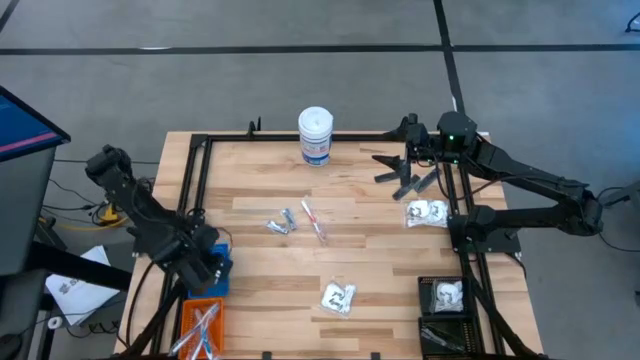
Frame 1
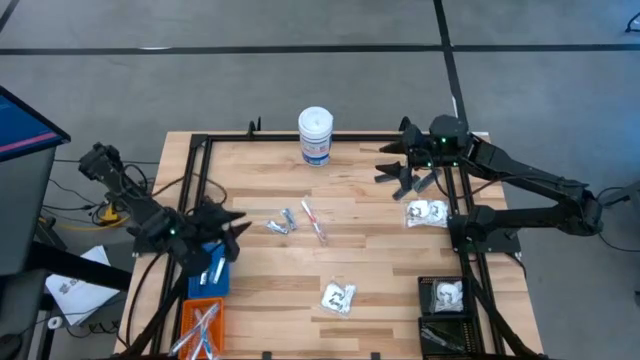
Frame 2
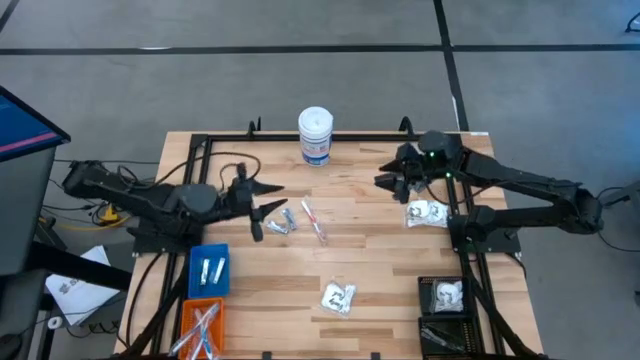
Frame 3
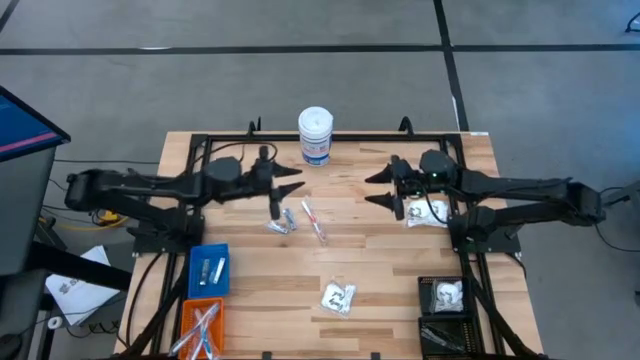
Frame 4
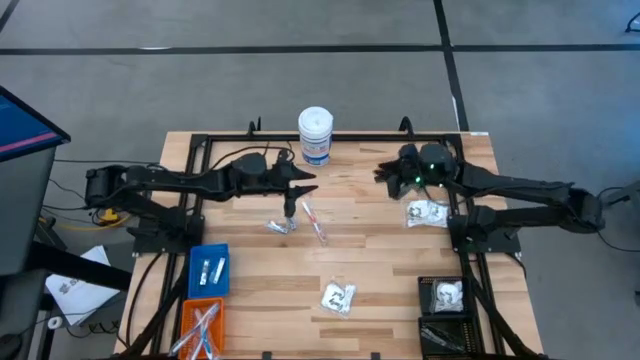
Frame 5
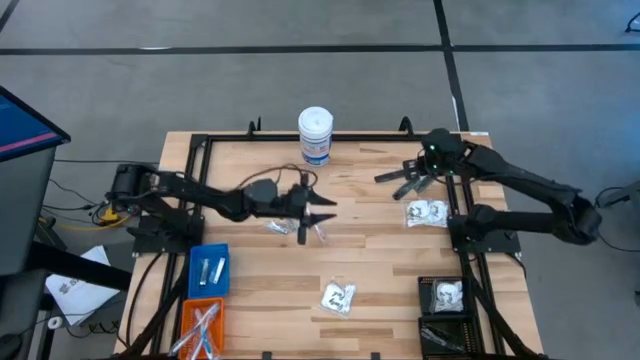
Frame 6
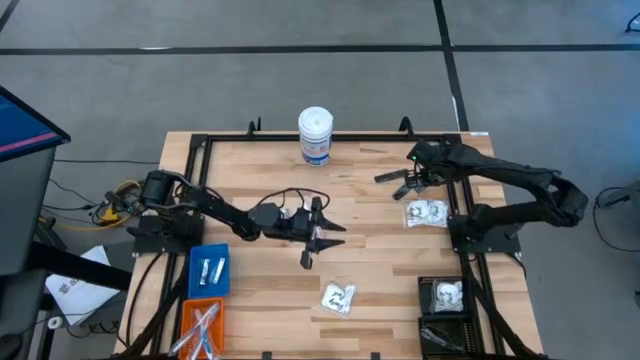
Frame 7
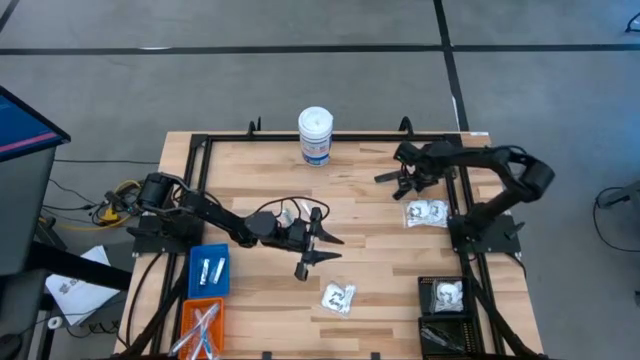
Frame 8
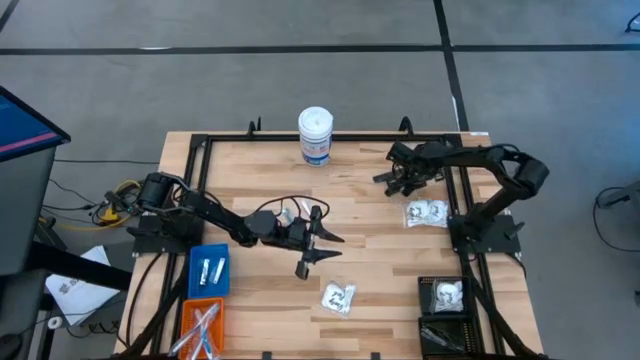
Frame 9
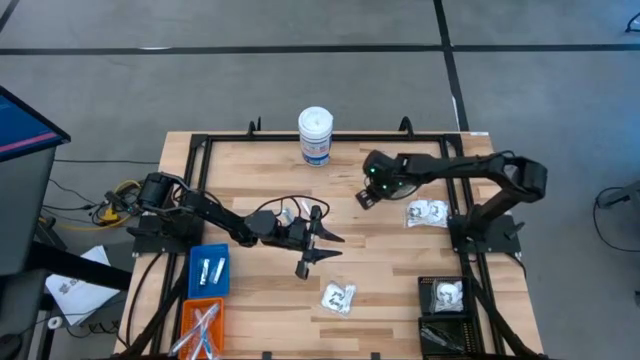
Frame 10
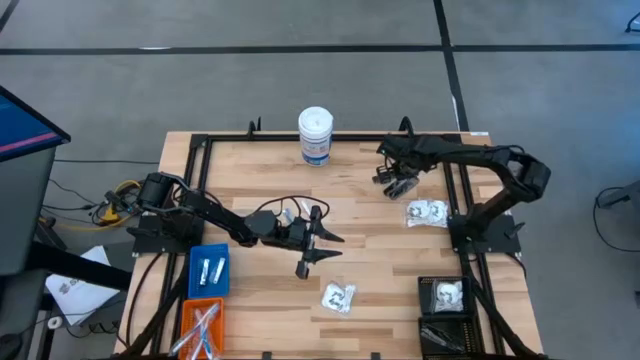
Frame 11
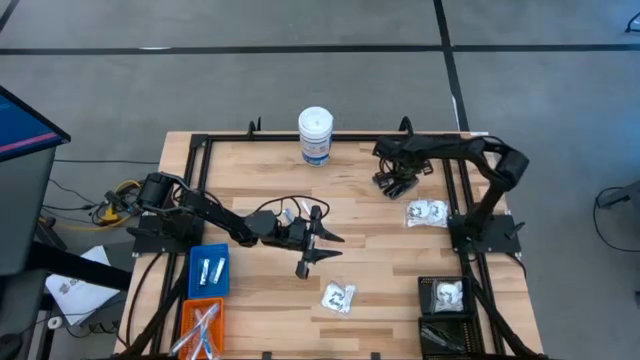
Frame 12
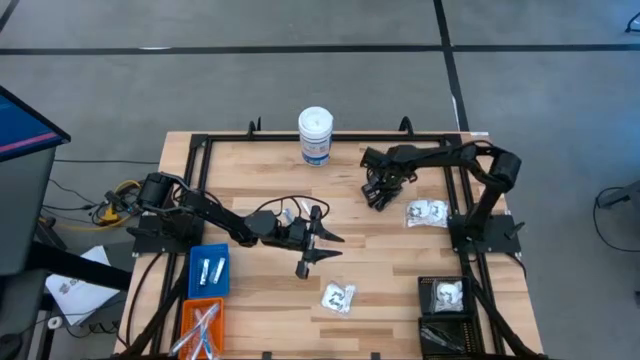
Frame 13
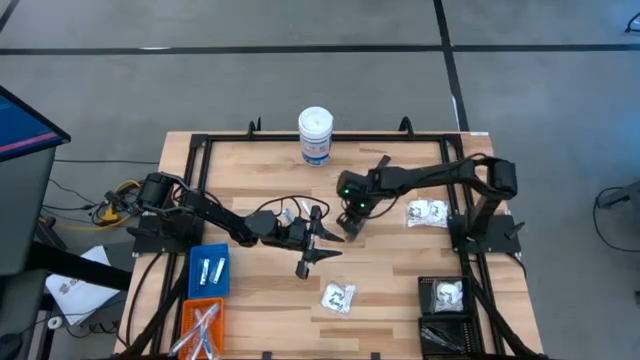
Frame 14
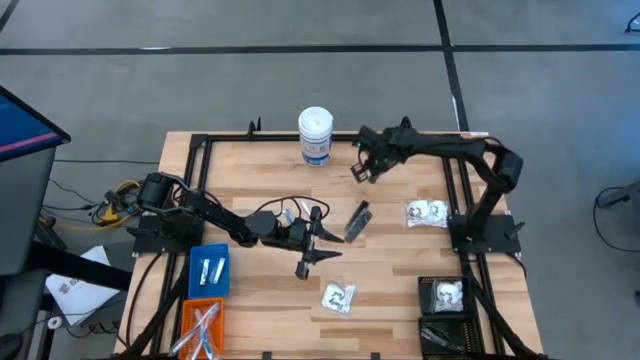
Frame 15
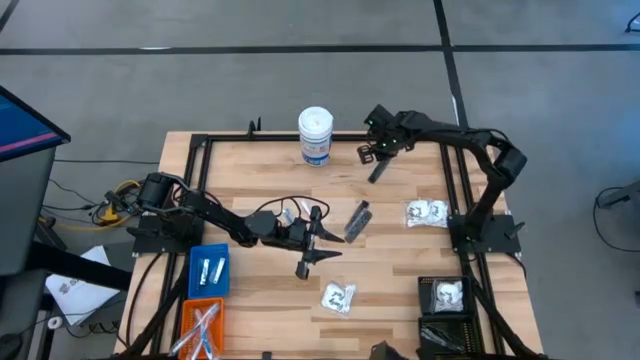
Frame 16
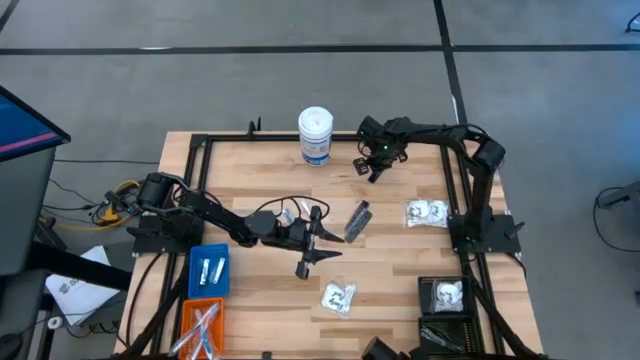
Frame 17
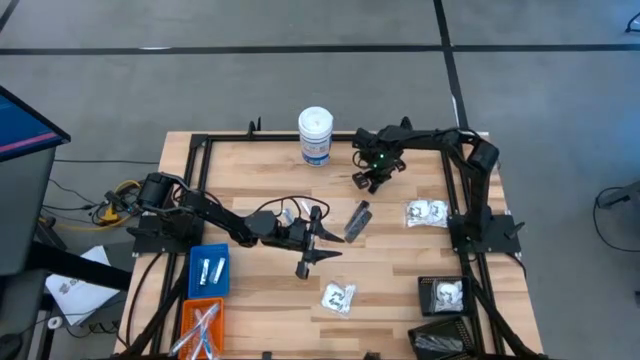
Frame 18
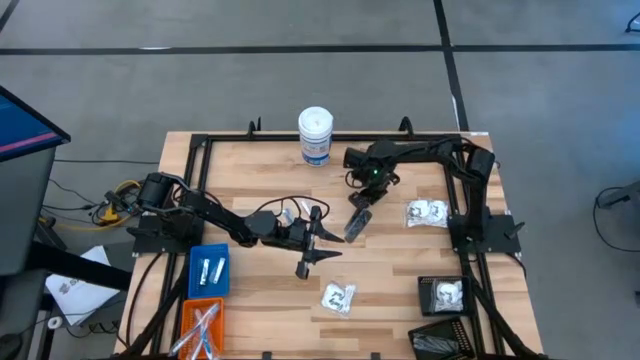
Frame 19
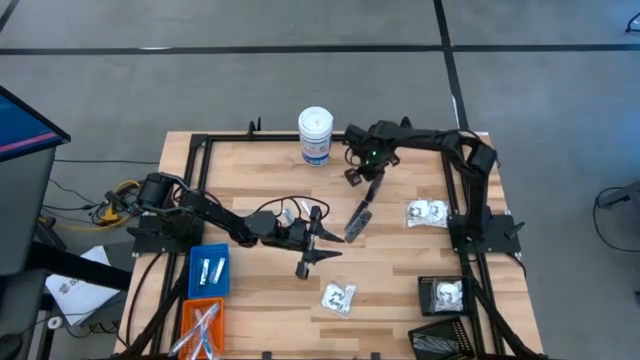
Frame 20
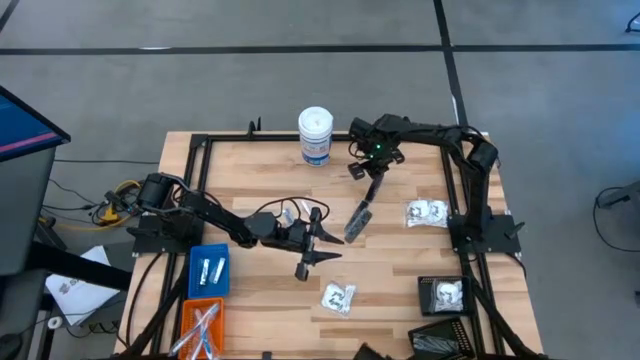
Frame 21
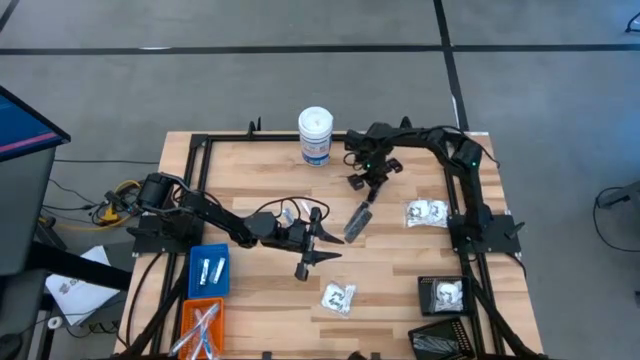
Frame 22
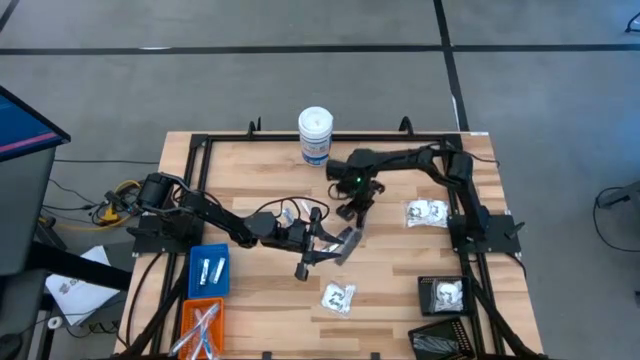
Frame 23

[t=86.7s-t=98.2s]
Task: Pick & Place Travel size toiletries
Adjust the black combs

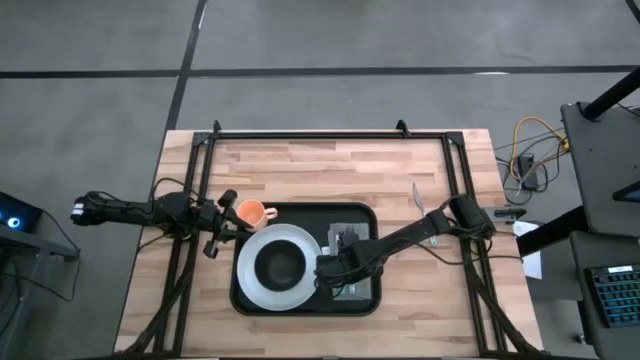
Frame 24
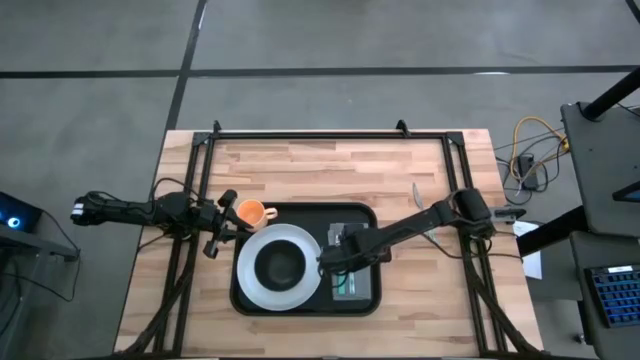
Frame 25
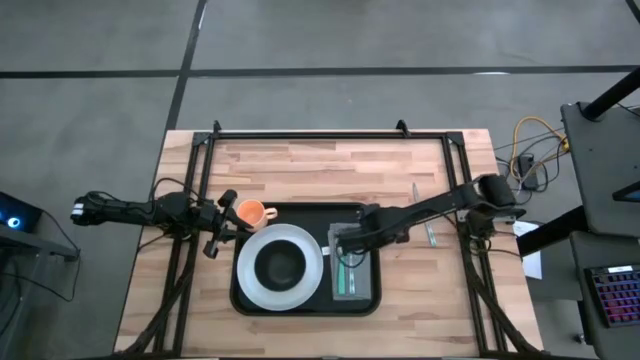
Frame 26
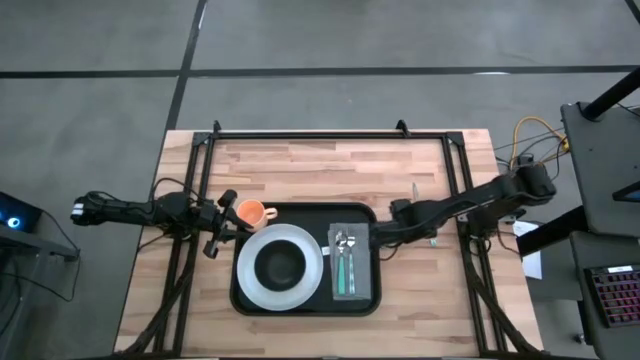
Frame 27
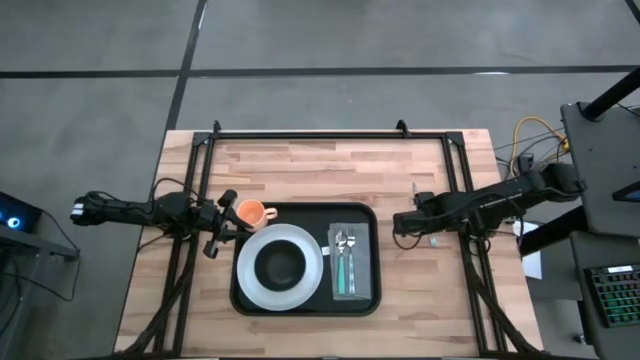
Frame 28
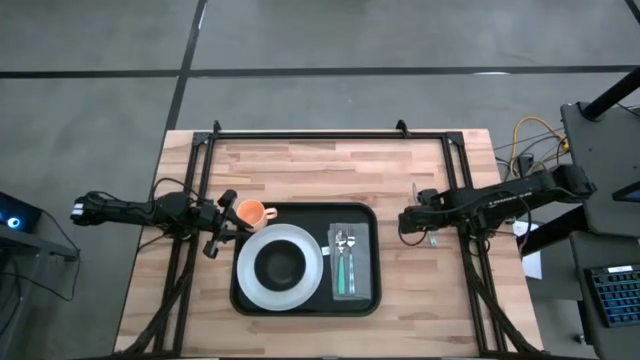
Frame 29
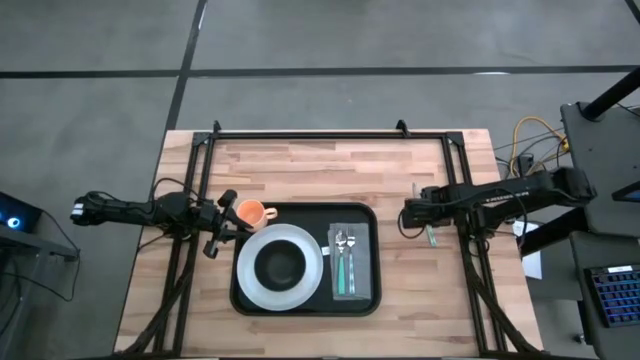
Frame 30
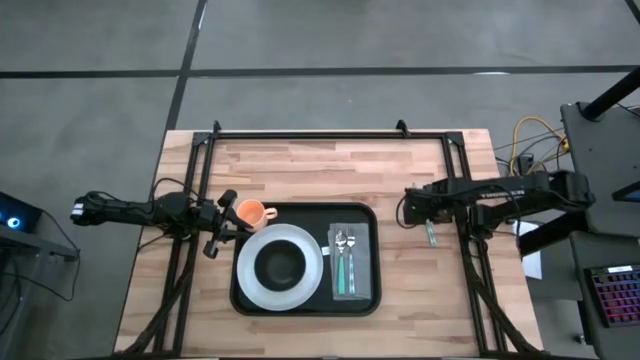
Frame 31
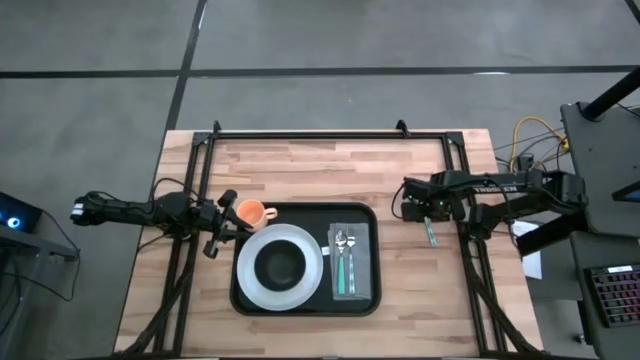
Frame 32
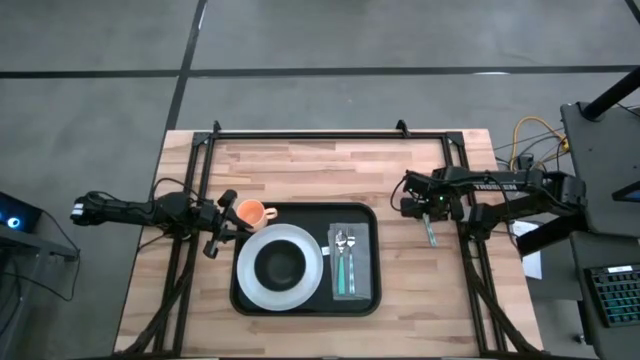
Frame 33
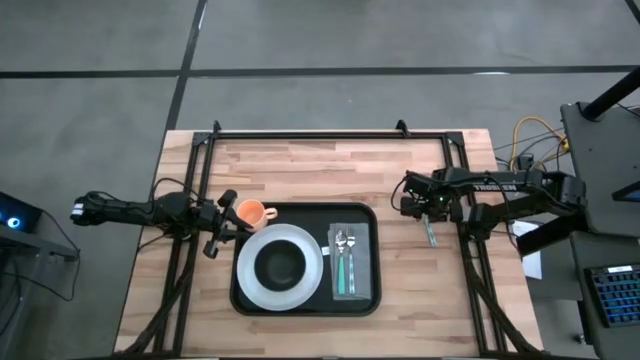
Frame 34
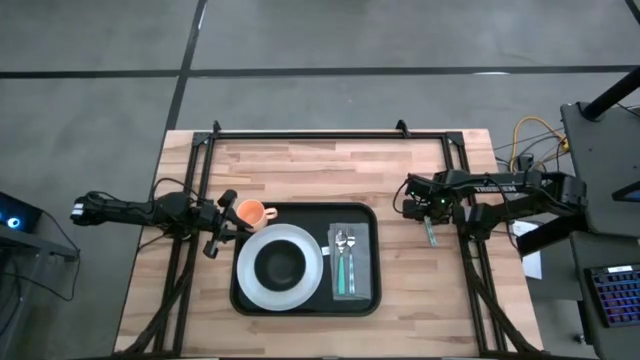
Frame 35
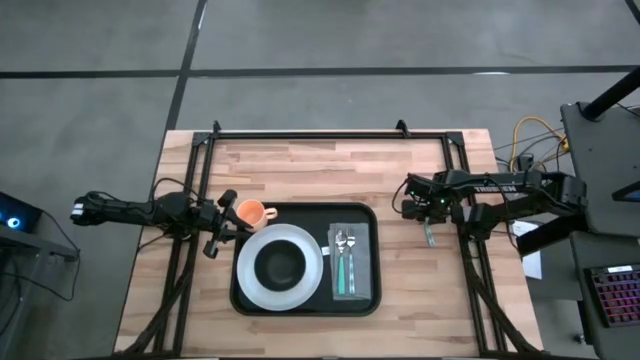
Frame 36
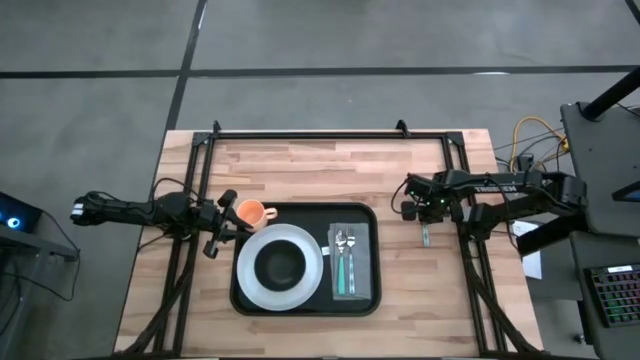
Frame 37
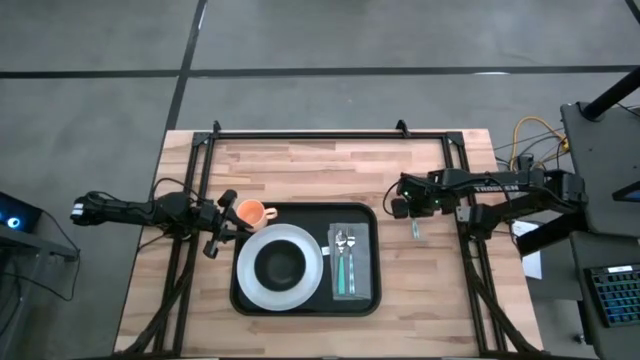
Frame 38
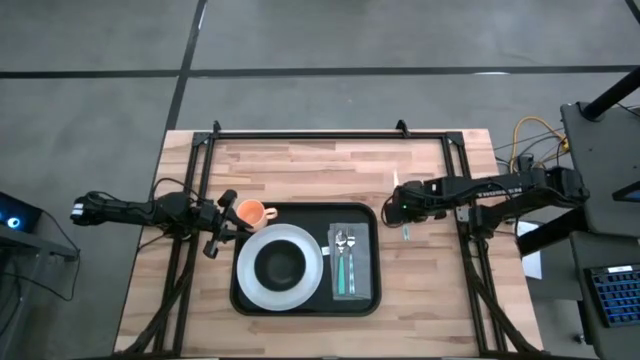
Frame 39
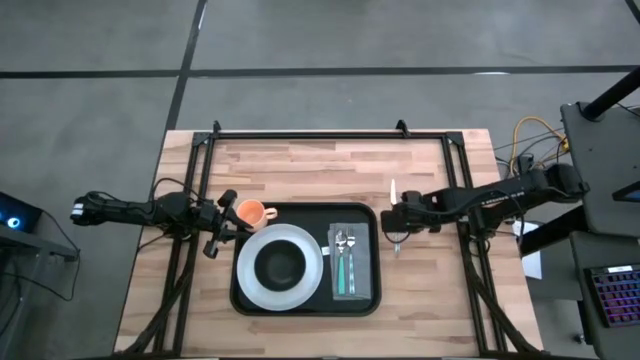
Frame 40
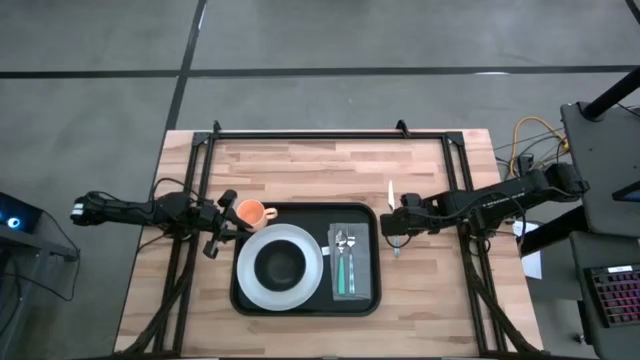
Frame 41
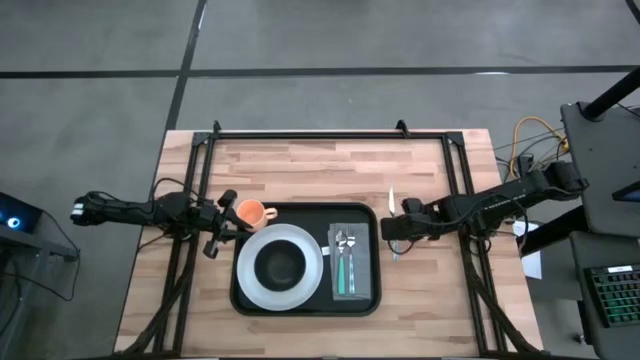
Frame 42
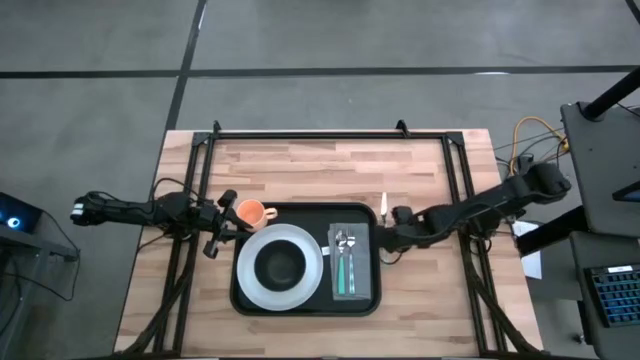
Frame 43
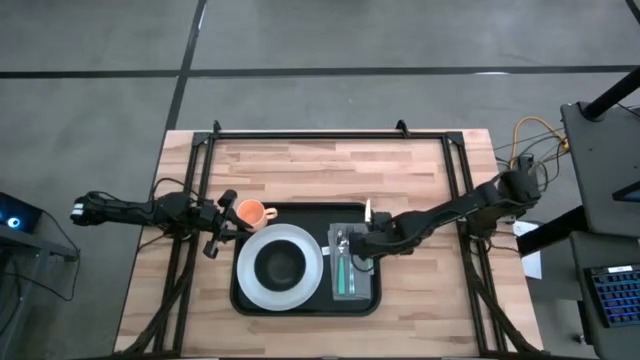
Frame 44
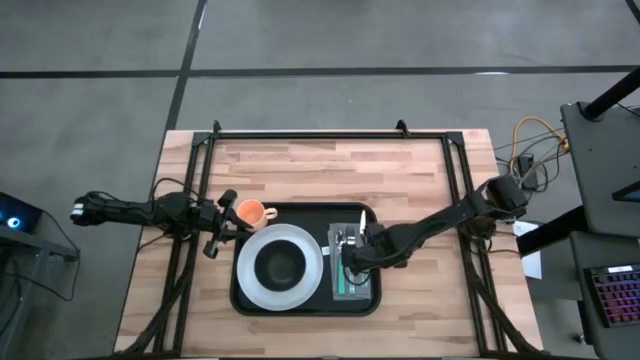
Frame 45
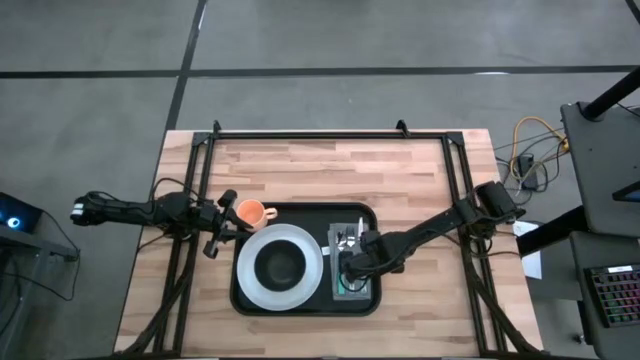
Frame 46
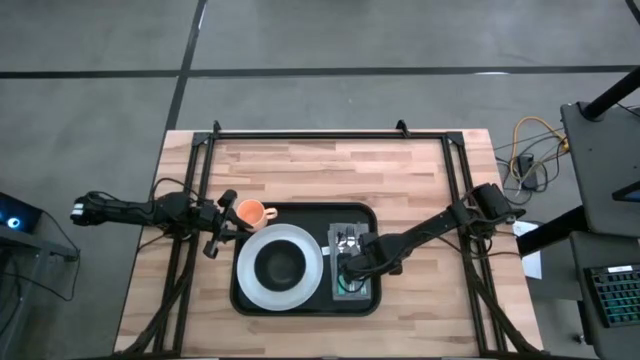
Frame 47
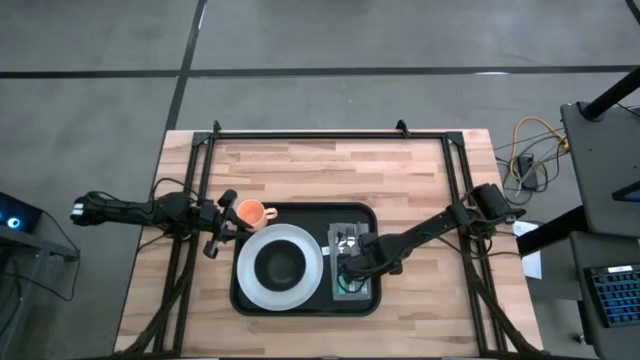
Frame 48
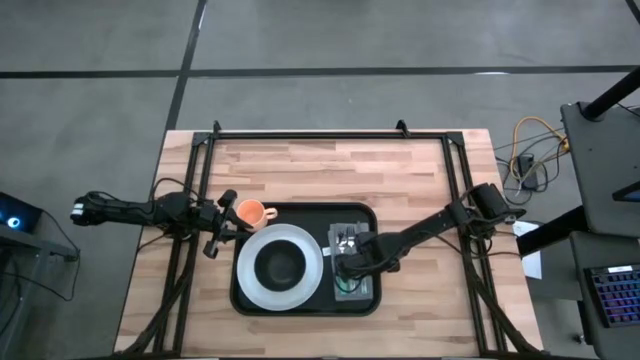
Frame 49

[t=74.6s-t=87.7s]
Task: Set up tray
Put the blue knife to the right of the blue fork on top of the gray table napkin on the black tray
